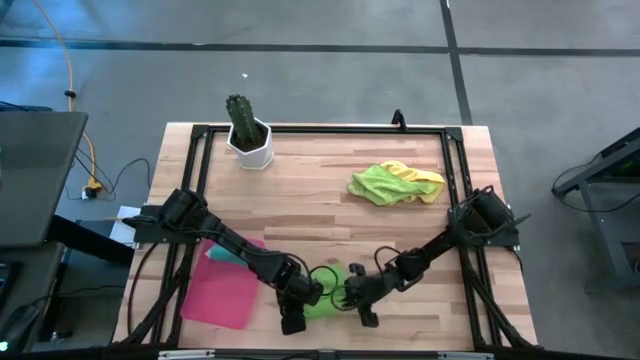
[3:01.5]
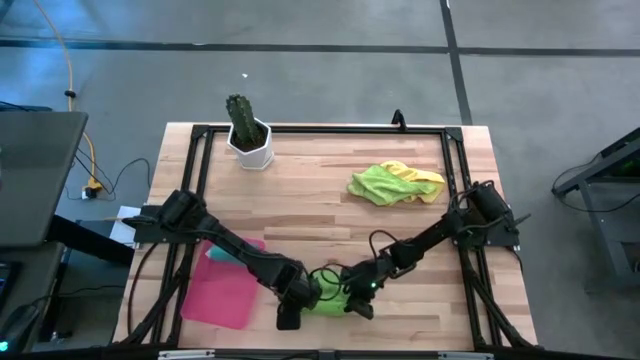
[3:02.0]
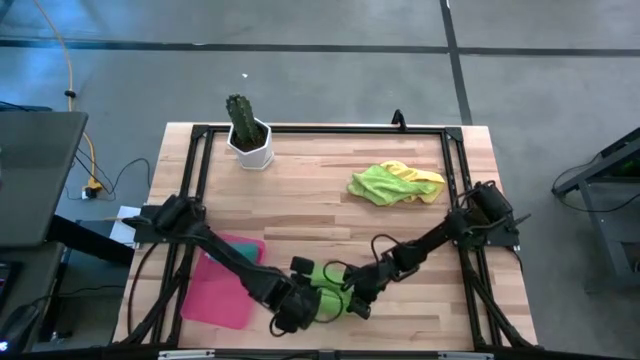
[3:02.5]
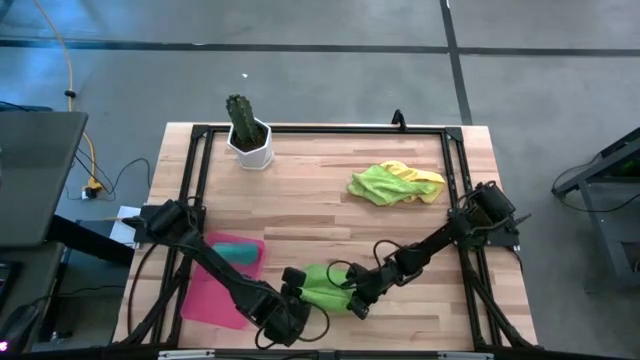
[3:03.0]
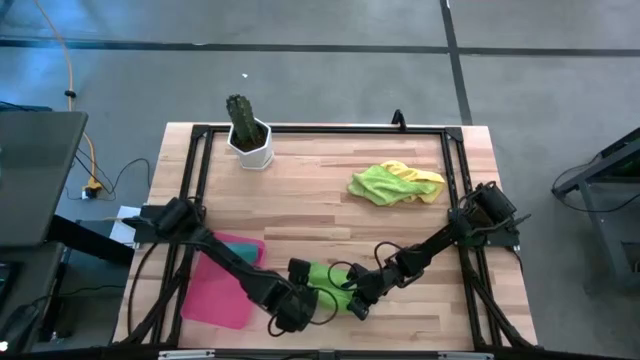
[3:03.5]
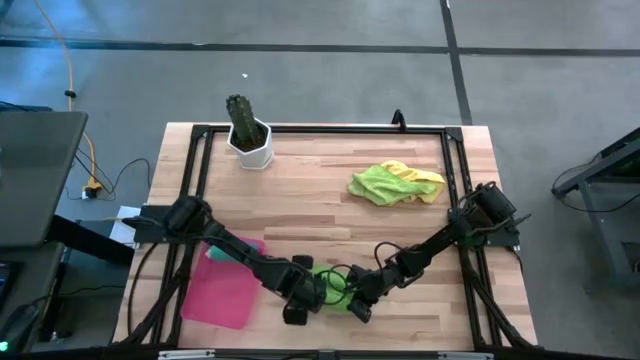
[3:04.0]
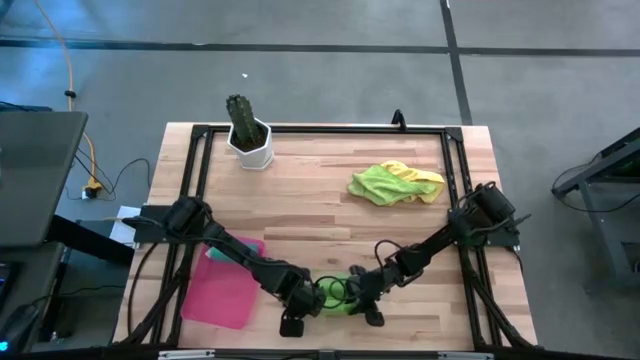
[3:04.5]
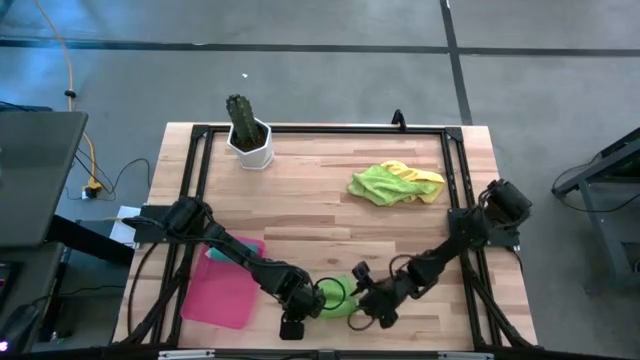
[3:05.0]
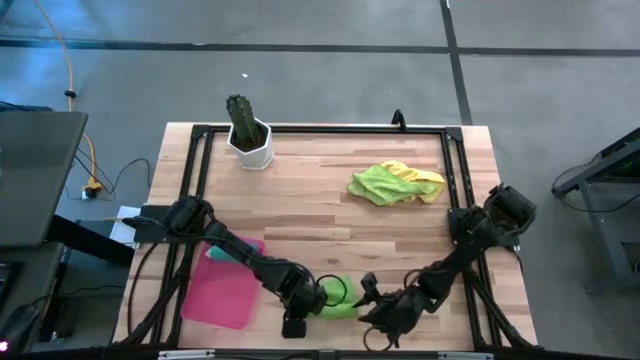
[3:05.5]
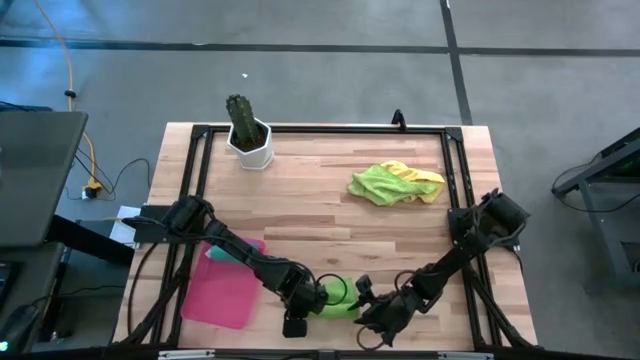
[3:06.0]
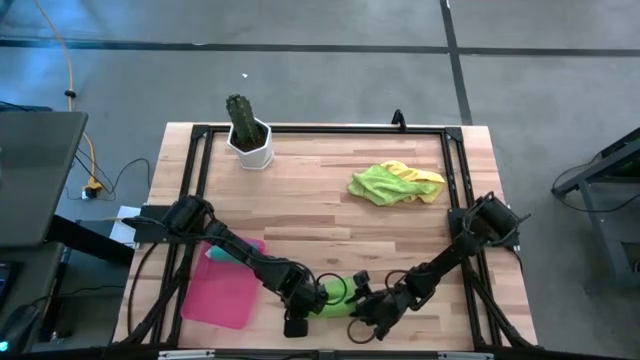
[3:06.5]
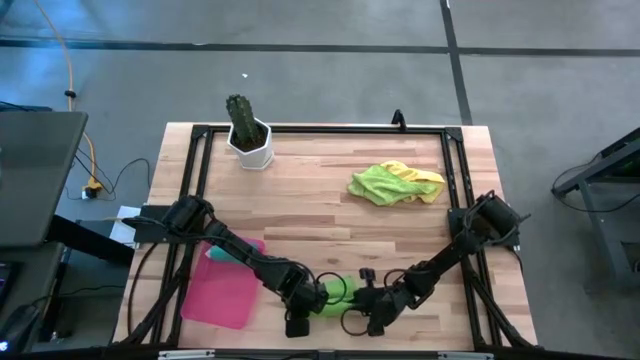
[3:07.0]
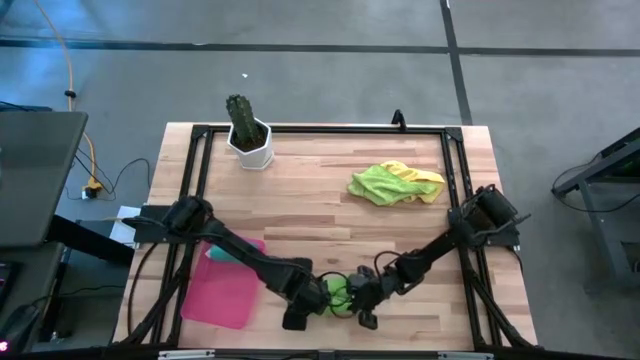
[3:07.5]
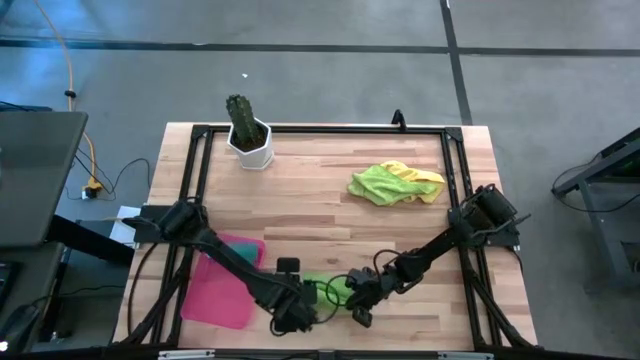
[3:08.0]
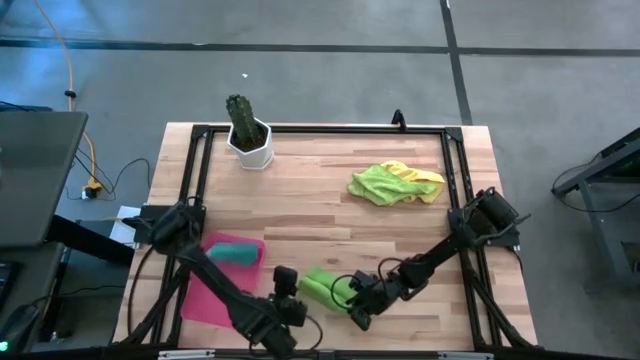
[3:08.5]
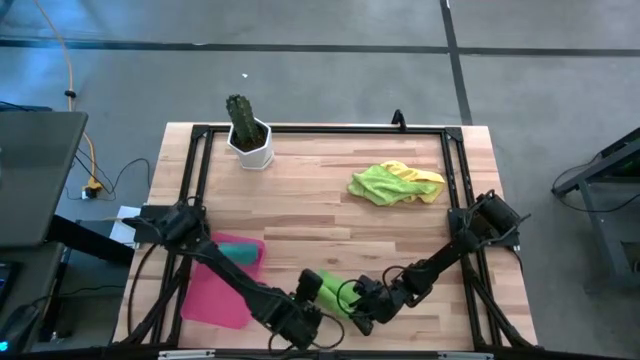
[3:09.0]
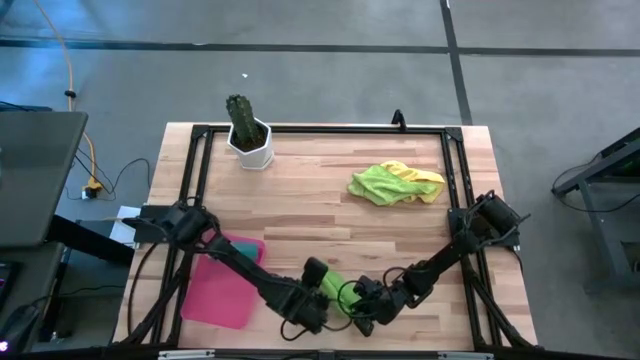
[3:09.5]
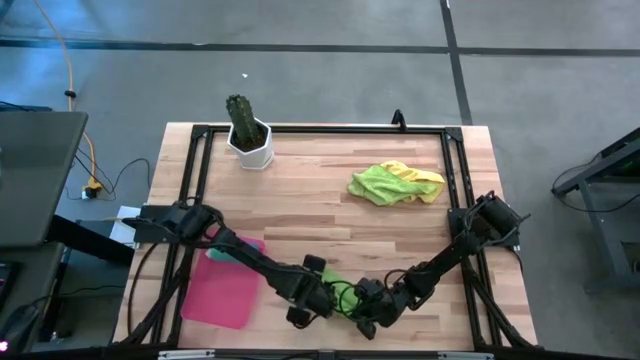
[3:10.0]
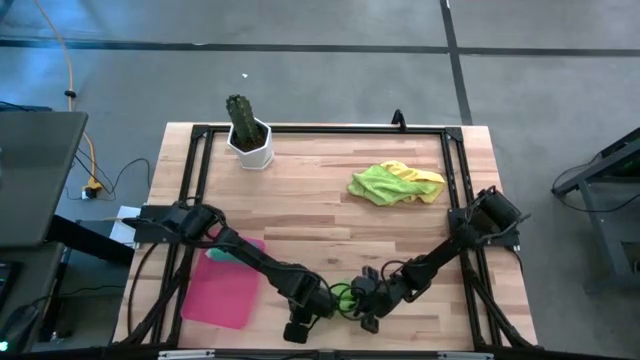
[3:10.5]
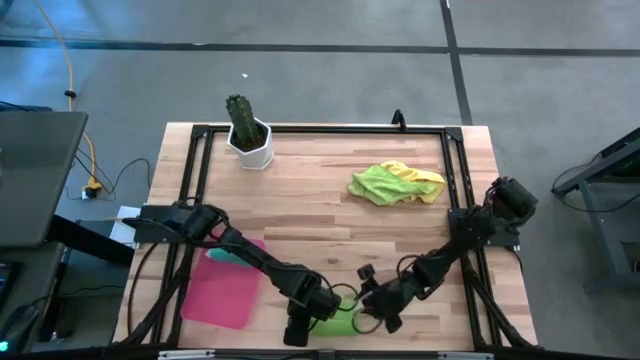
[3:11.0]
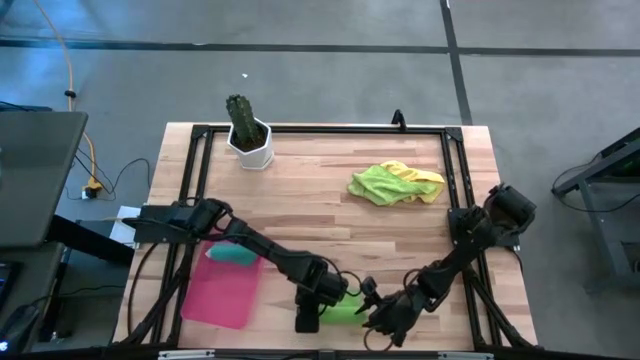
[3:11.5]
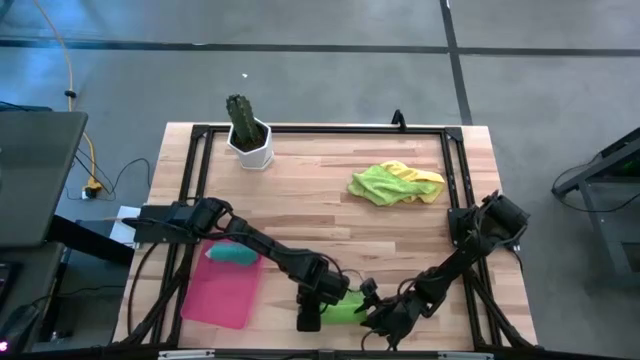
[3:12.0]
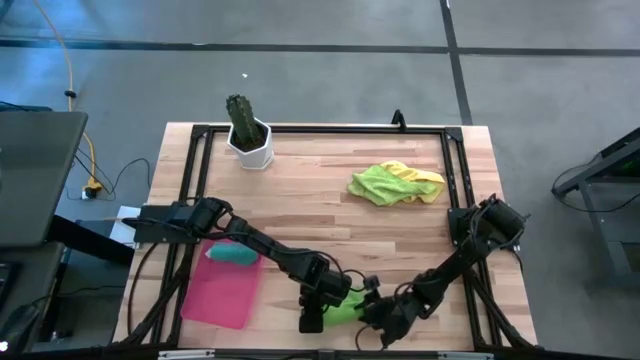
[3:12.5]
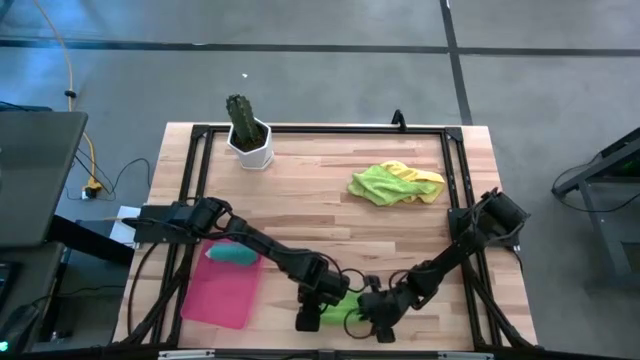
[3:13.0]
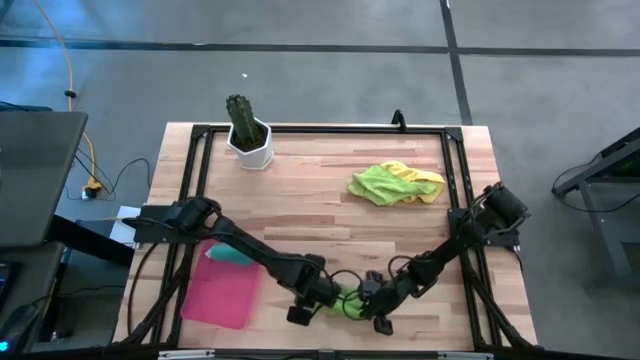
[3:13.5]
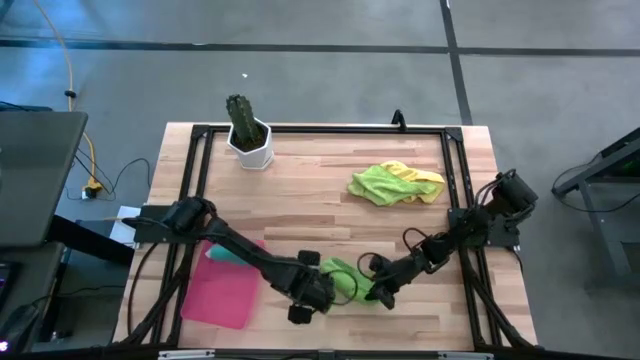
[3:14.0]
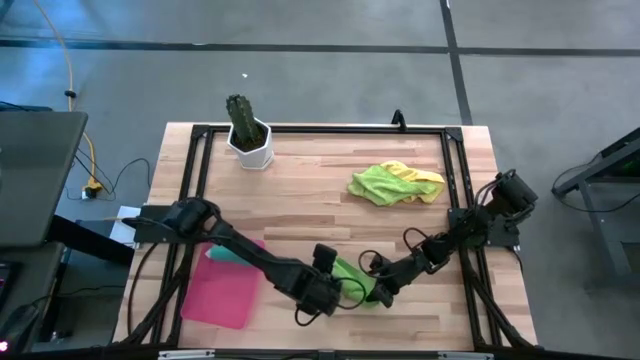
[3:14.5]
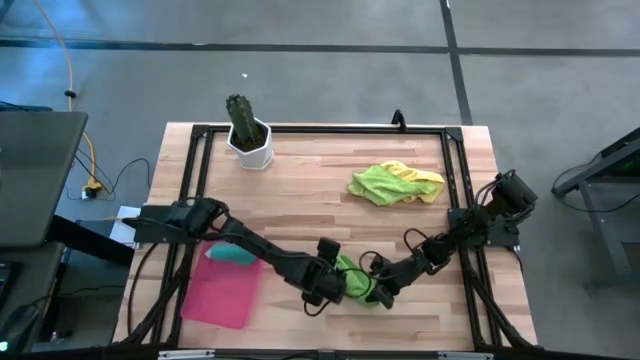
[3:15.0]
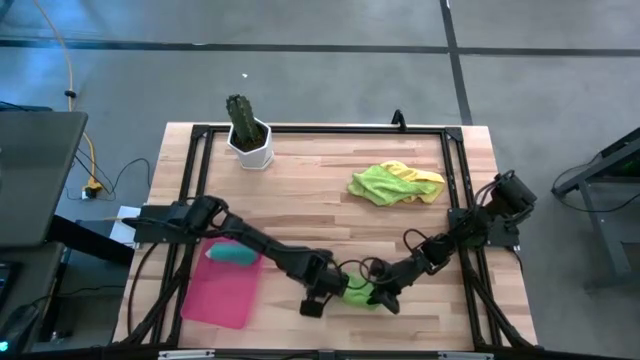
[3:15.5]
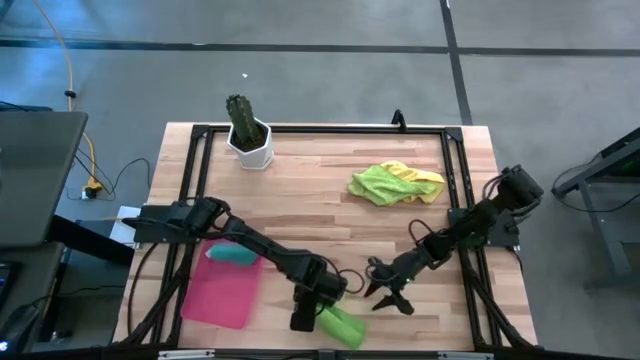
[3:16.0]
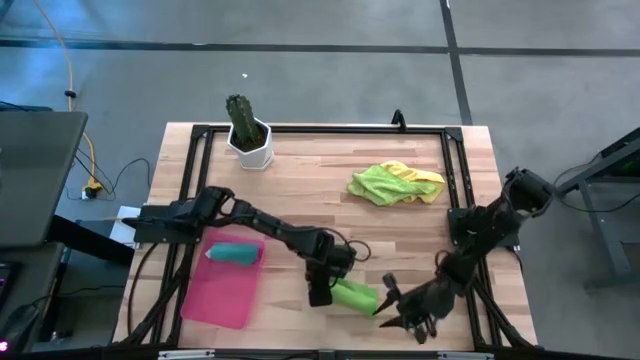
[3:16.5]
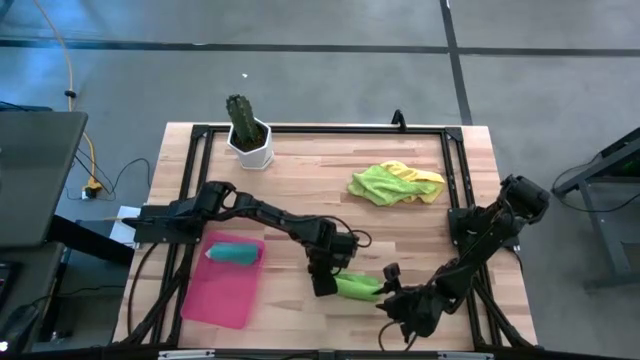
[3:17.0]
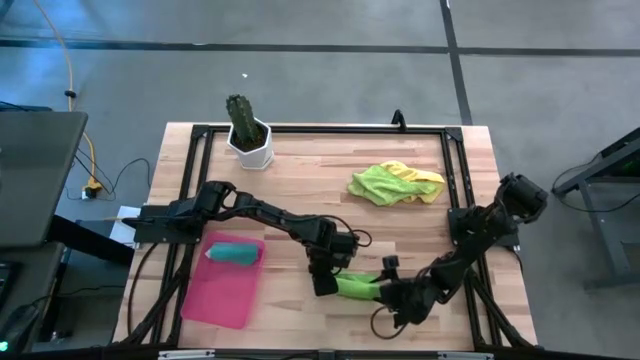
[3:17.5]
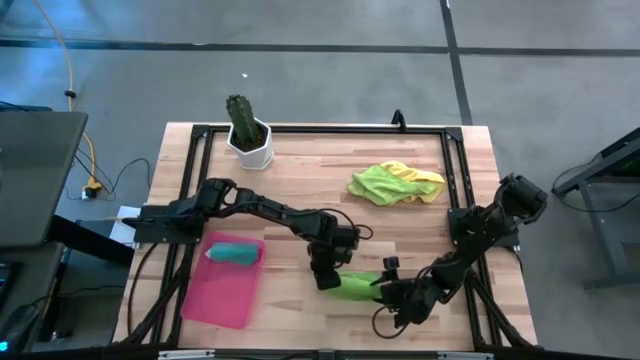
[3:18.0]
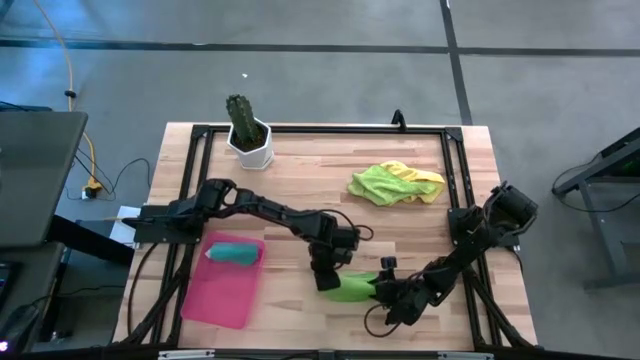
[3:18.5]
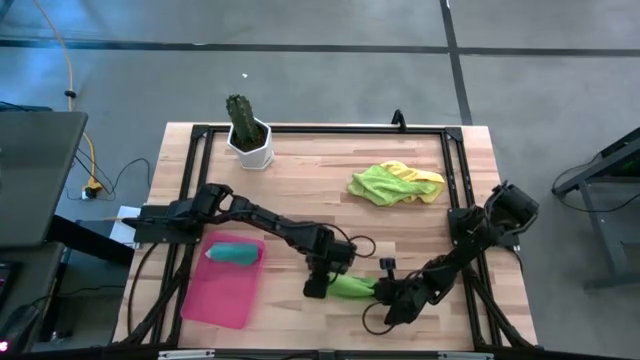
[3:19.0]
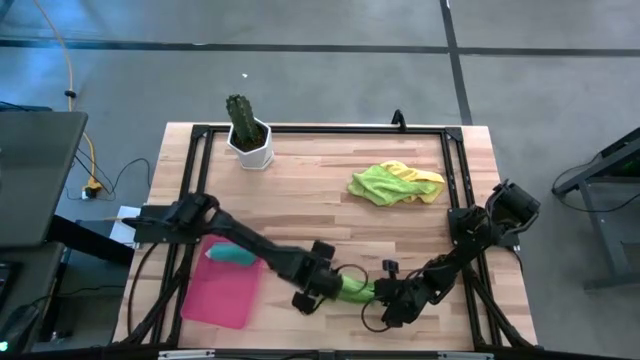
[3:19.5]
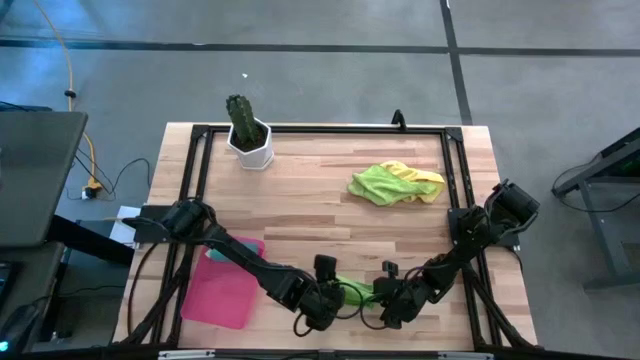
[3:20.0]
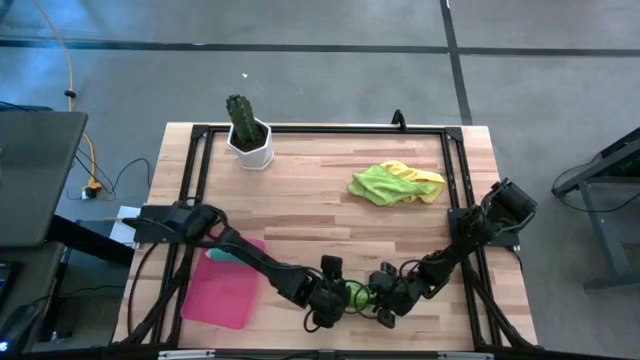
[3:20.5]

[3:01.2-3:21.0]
Task: Roll microfiber towels into tight, uniform cylinder then place into a basket
Roll the dark green towel
